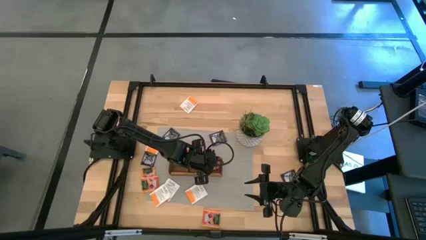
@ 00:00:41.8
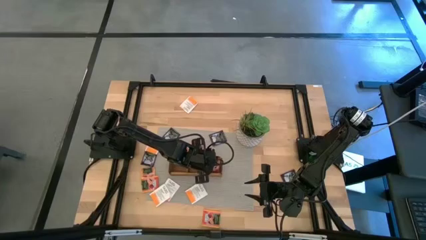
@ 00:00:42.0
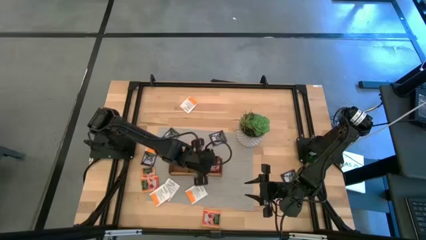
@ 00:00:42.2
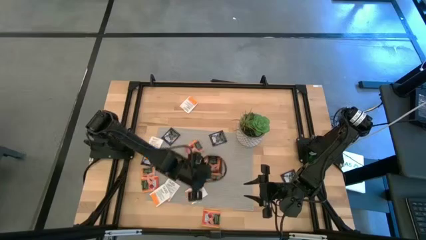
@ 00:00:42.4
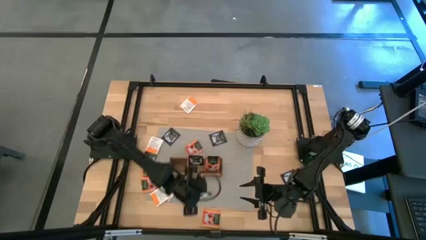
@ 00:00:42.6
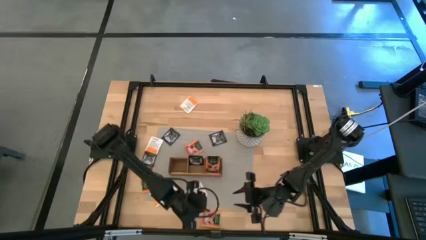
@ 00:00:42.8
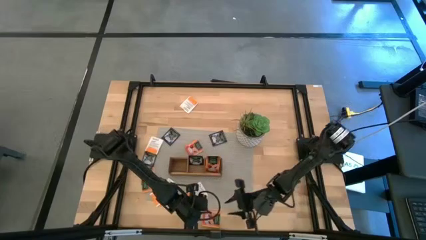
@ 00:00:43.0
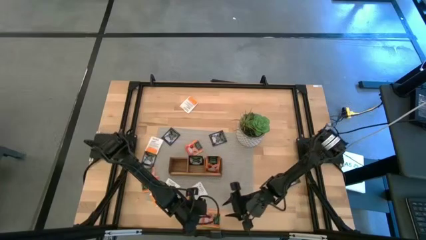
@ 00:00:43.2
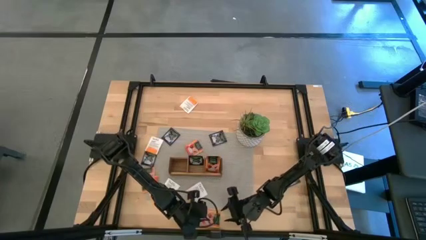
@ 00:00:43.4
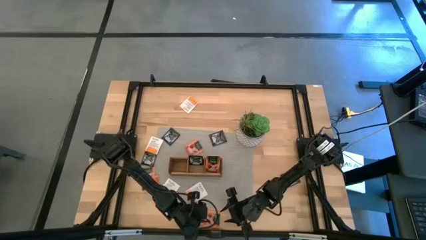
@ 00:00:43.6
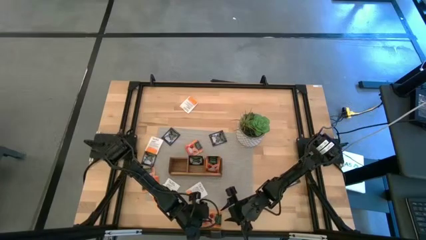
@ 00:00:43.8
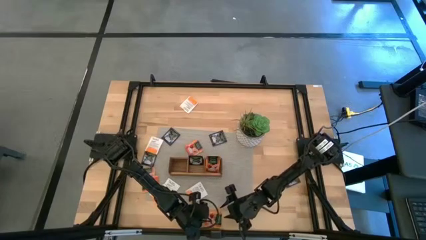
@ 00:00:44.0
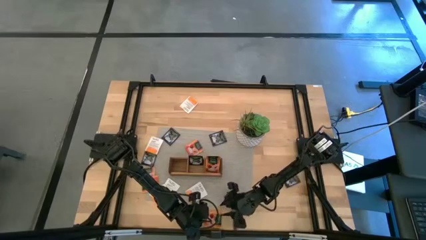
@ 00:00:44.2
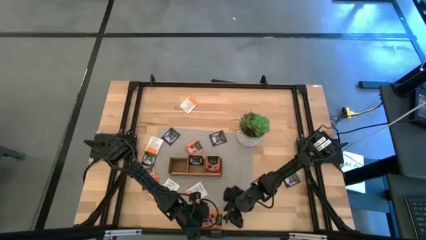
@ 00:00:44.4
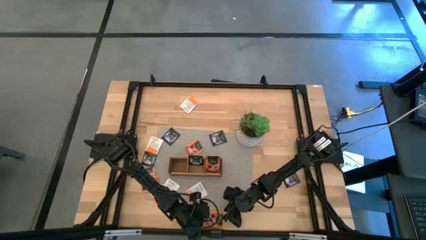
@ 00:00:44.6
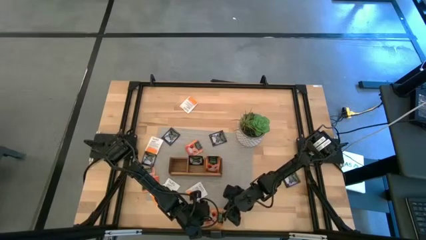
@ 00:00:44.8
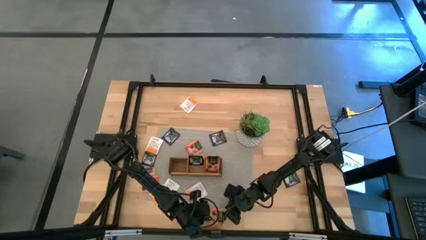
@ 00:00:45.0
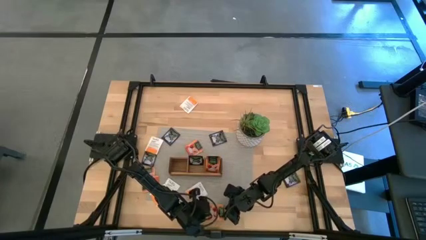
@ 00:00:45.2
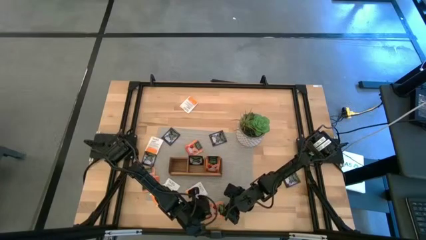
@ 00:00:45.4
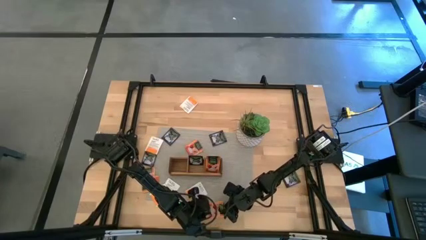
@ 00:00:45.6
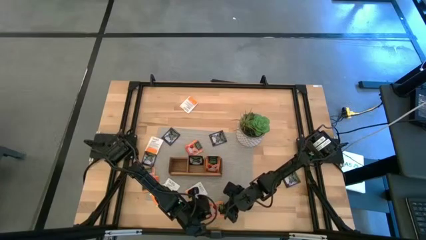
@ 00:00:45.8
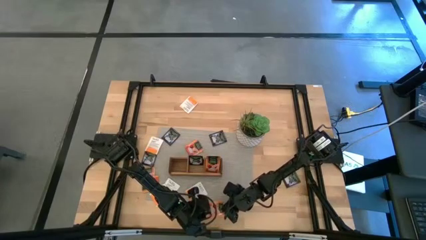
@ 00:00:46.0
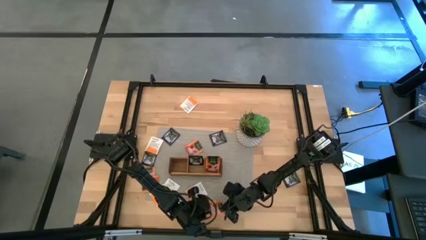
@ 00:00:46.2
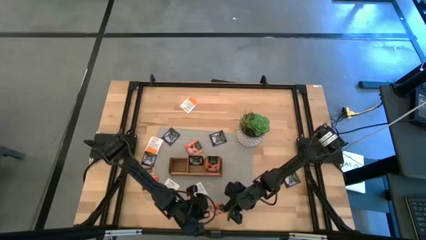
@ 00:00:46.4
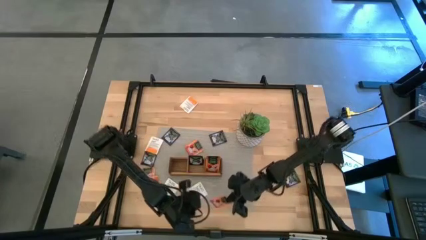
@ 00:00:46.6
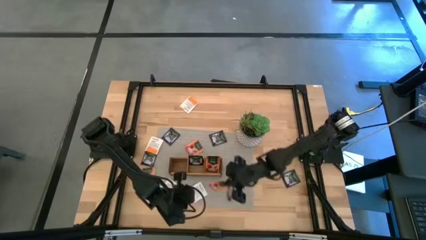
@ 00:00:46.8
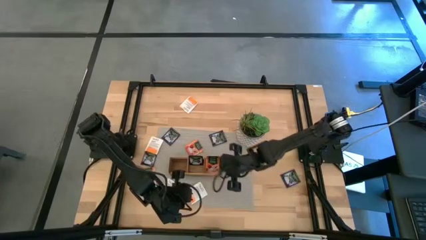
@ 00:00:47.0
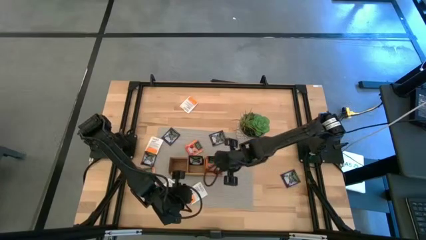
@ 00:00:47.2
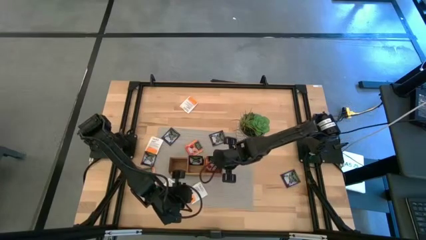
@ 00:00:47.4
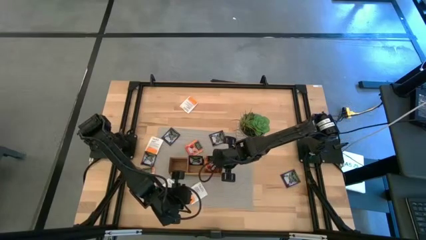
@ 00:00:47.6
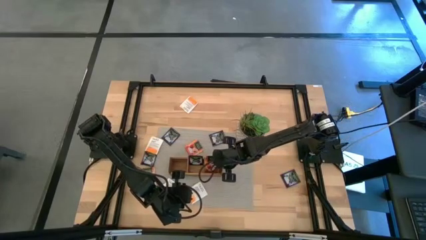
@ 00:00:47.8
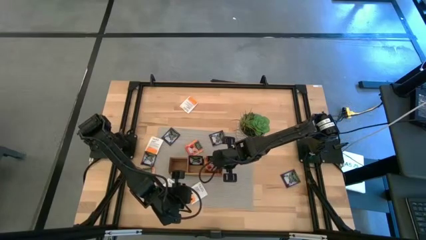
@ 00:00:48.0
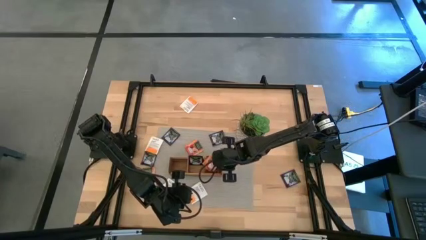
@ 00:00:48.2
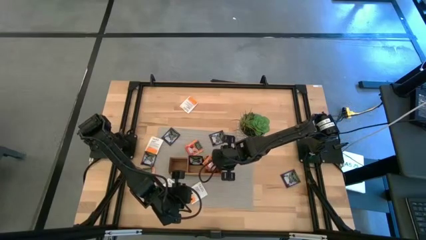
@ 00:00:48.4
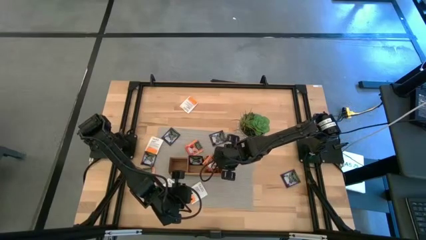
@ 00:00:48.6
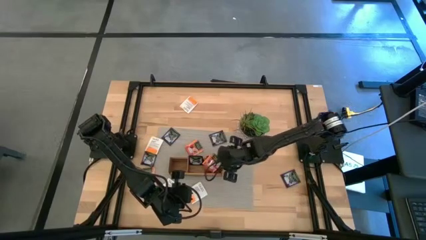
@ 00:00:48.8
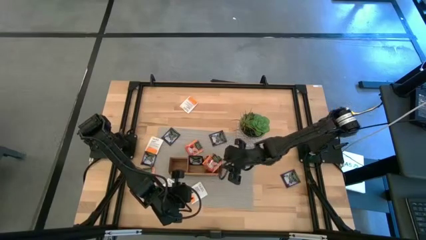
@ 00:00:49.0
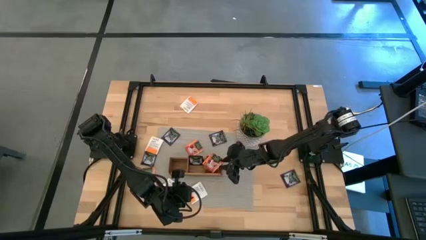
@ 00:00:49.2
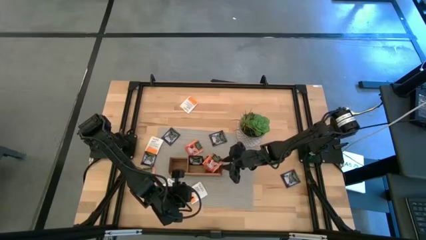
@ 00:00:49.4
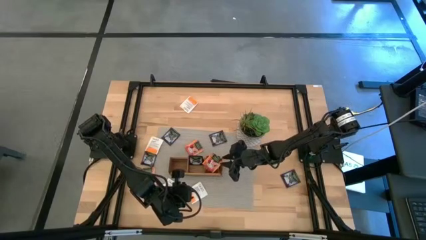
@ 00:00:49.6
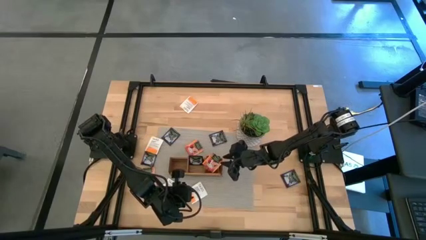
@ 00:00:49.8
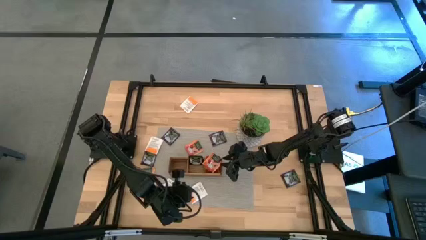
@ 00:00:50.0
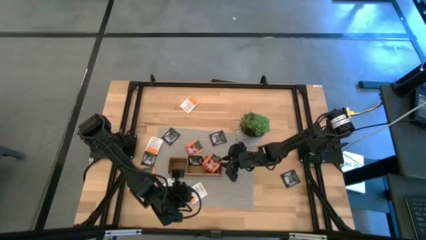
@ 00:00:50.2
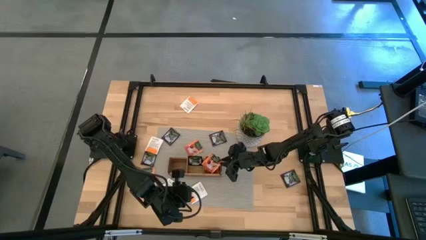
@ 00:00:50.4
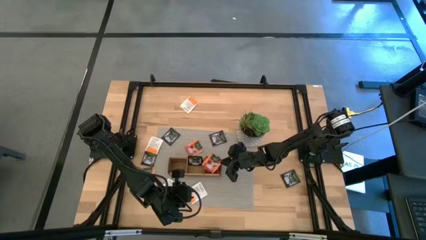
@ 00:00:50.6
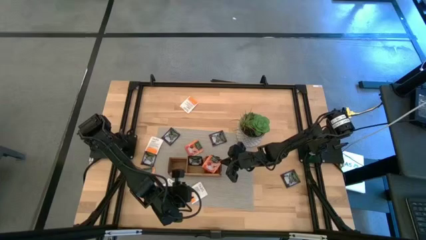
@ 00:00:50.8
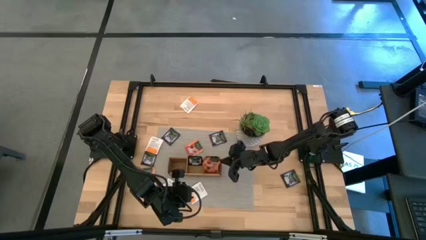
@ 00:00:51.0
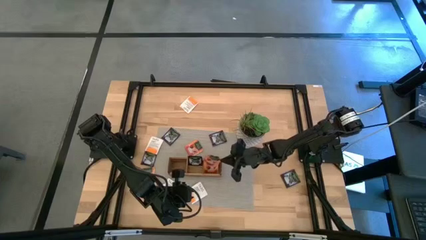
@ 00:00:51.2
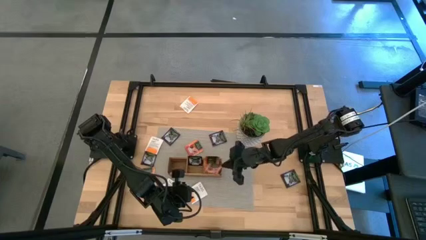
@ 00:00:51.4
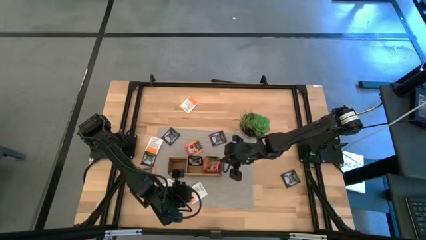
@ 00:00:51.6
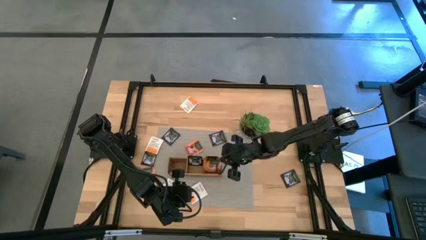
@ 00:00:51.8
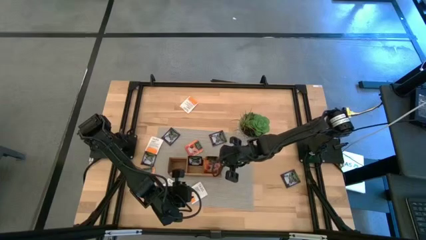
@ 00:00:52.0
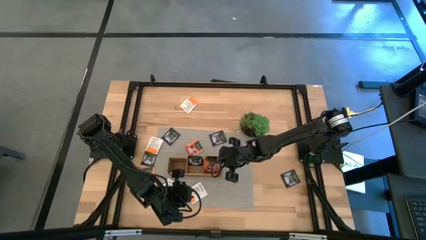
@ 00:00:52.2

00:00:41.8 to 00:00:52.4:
Task: Pick & Place Tea
Put the orange tea bag into the right section of the wooden organizer

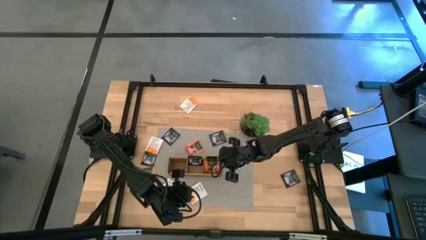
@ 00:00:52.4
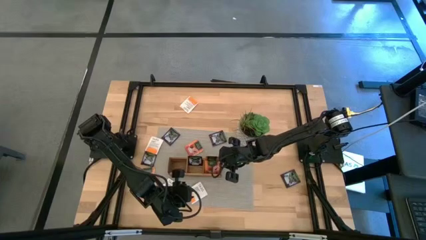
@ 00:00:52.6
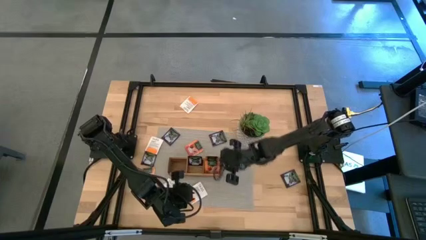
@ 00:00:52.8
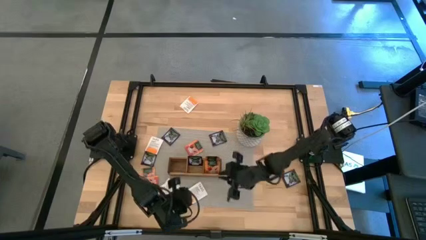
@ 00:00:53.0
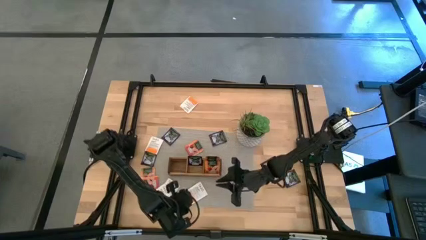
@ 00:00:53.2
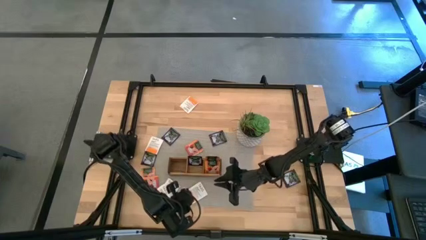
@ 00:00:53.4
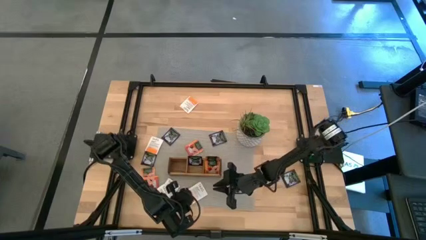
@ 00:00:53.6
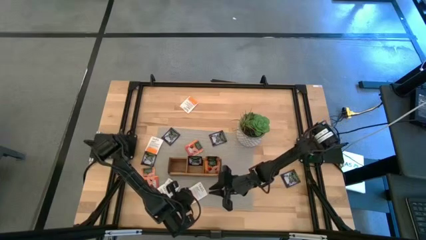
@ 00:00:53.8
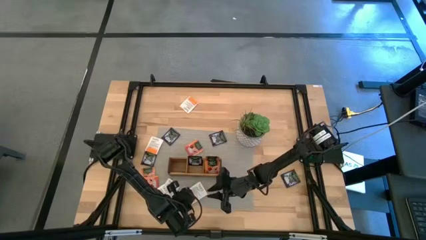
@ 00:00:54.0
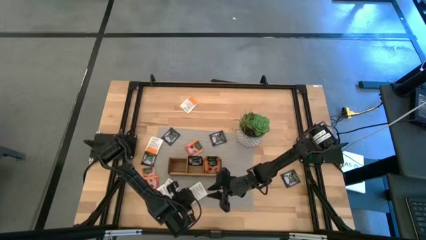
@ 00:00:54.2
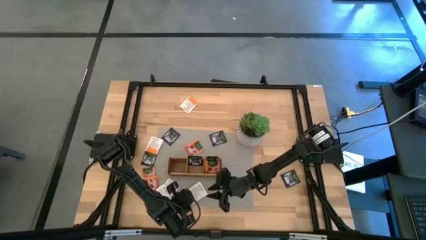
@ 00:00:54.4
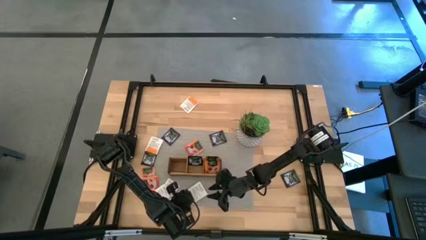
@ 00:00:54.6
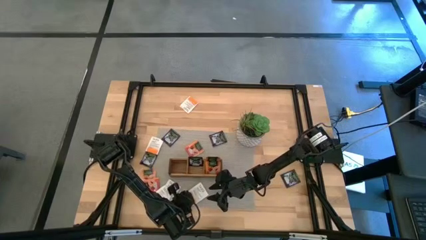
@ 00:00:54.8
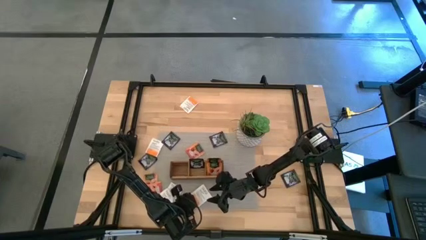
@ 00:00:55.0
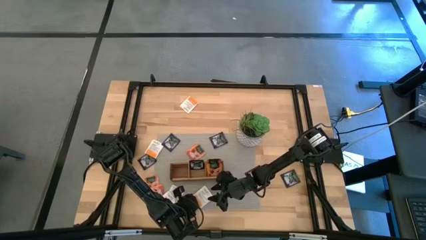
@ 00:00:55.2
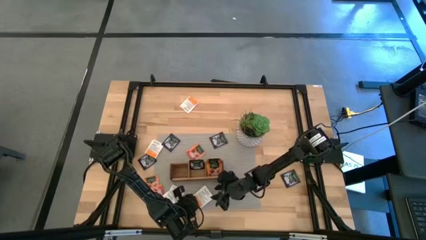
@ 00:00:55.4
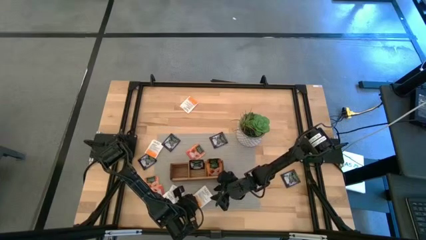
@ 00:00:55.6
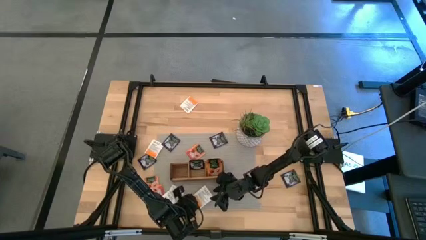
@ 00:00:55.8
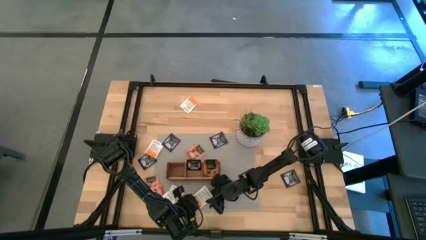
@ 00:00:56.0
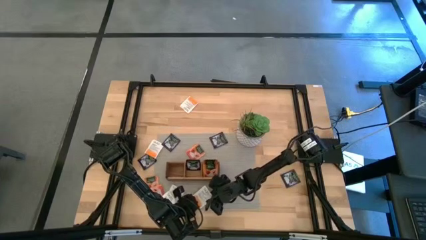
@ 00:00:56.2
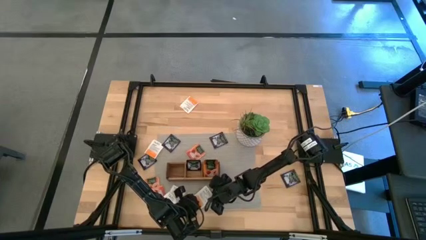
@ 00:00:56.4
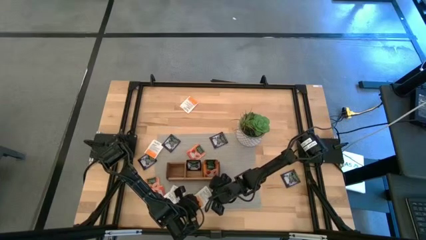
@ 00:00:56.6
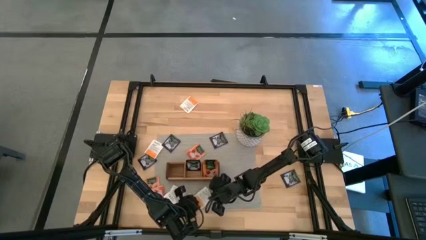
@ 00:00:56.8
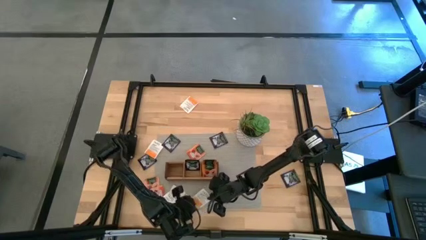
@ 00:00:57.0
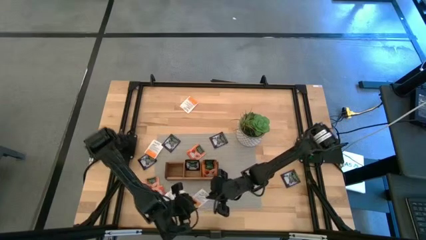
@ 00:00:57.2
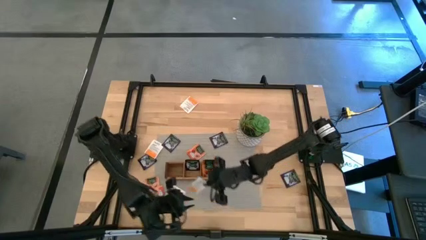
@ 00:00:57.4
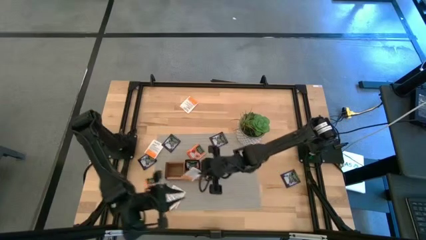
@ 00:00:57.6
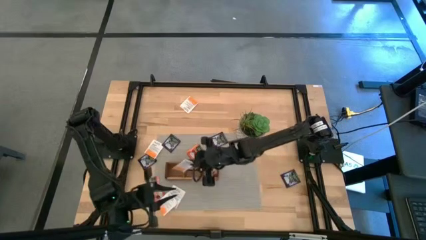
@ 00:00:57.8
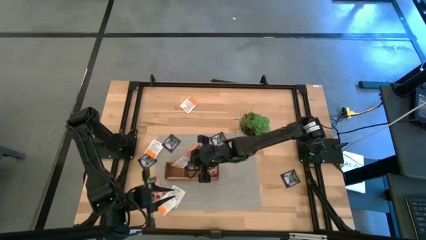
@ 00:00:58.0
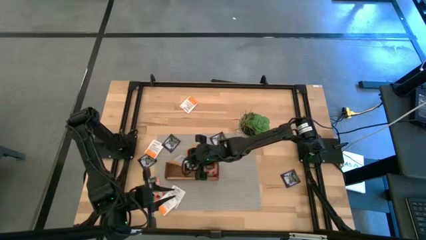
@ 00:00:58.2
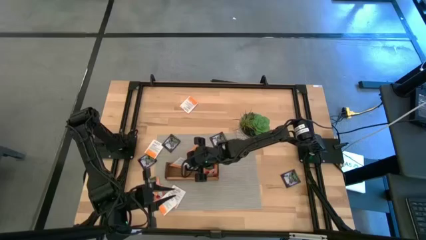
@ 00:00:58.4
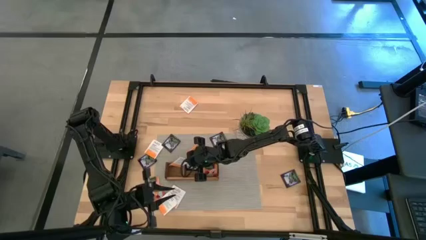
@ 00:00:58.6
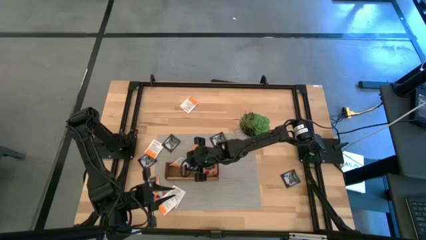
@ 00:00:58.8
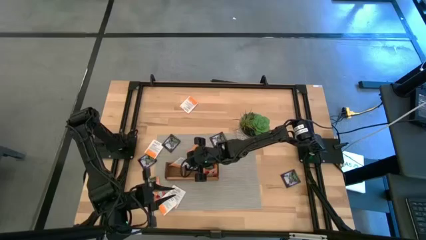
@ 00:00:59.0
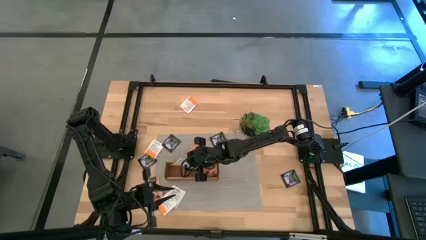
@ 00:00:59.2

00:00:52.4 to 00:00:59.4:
Put the white tea bag into the left section of the wooden organizer
